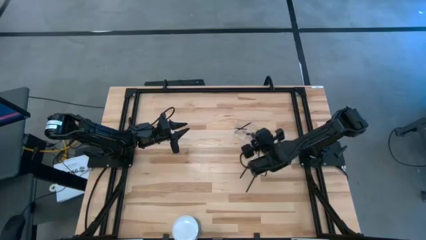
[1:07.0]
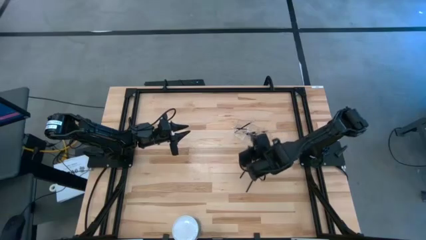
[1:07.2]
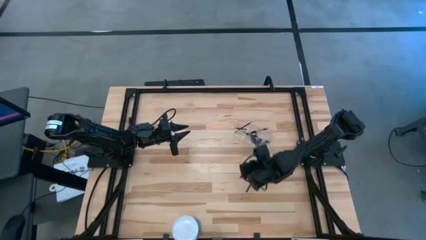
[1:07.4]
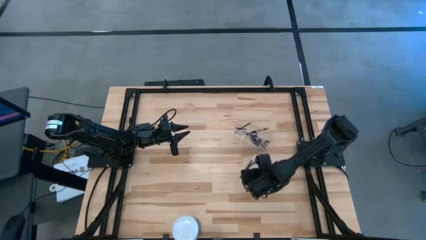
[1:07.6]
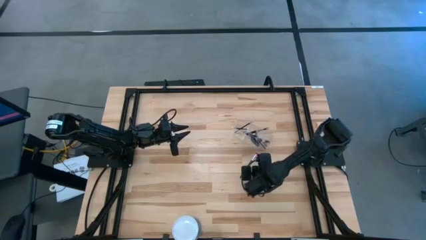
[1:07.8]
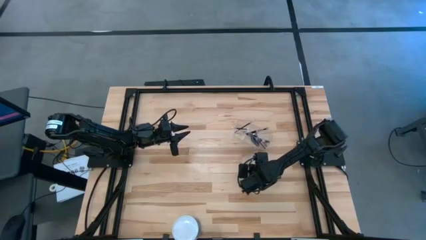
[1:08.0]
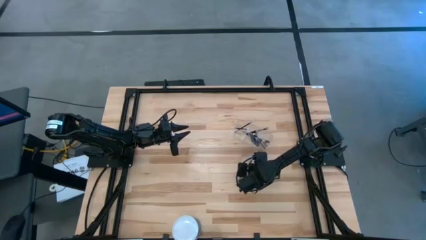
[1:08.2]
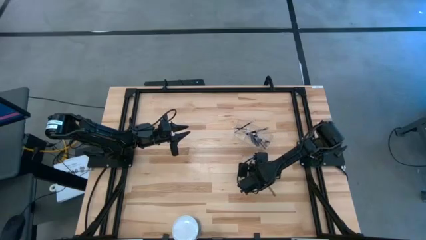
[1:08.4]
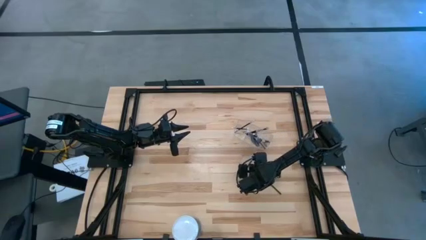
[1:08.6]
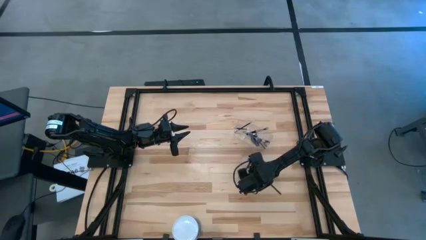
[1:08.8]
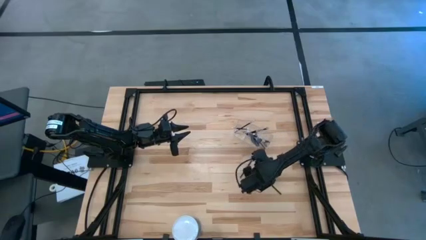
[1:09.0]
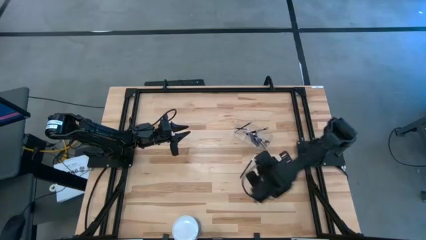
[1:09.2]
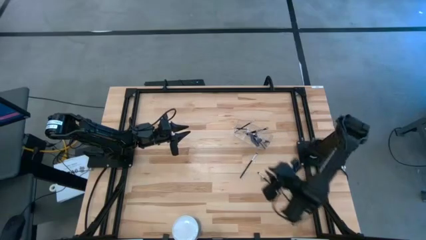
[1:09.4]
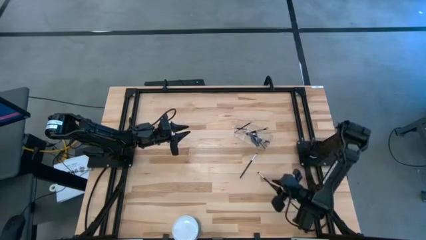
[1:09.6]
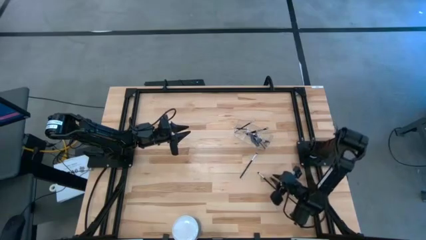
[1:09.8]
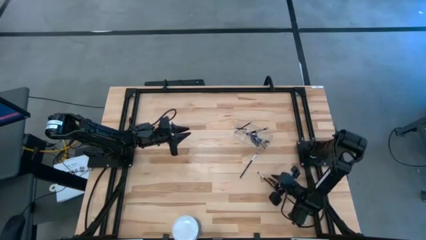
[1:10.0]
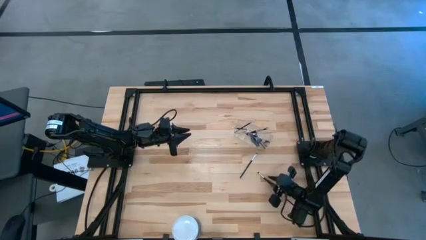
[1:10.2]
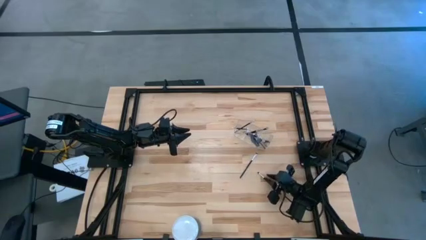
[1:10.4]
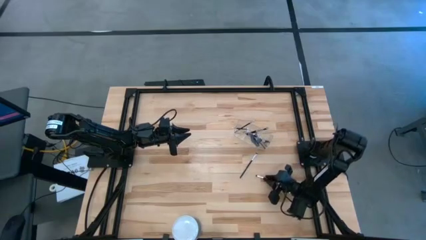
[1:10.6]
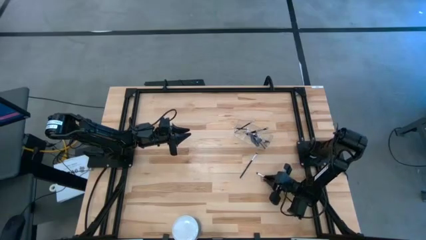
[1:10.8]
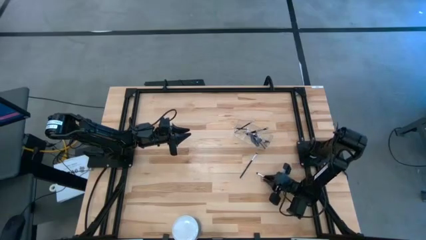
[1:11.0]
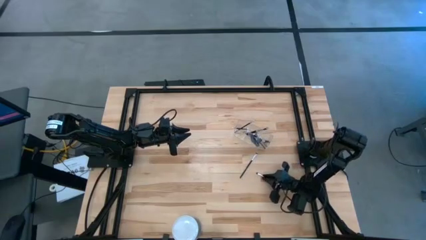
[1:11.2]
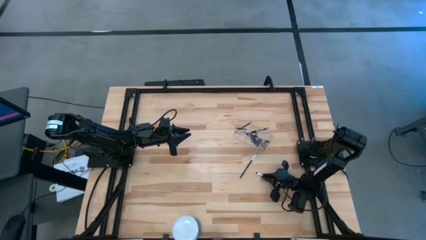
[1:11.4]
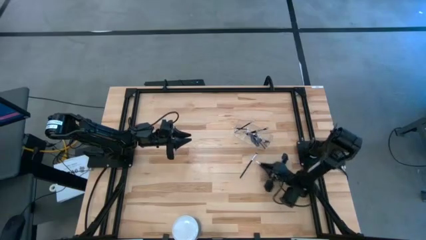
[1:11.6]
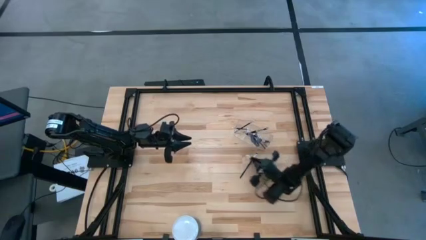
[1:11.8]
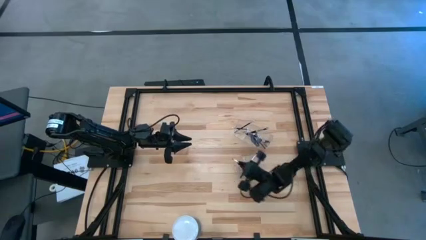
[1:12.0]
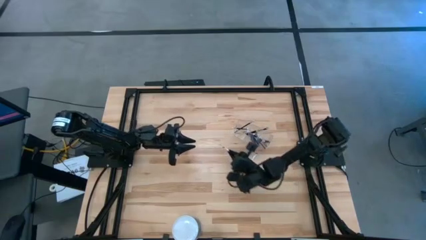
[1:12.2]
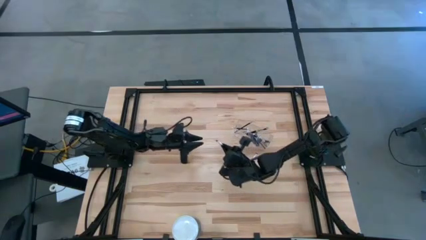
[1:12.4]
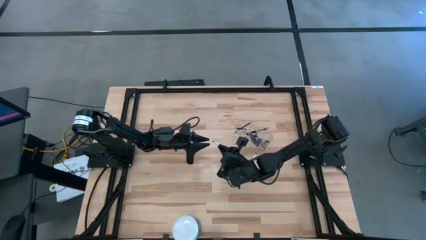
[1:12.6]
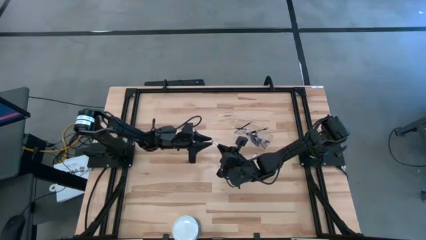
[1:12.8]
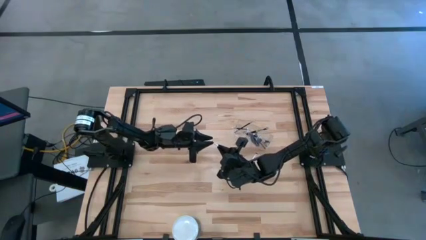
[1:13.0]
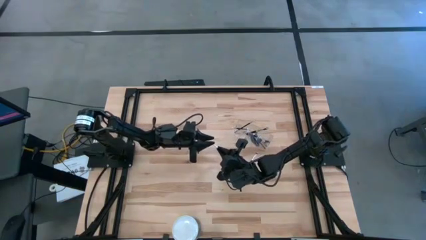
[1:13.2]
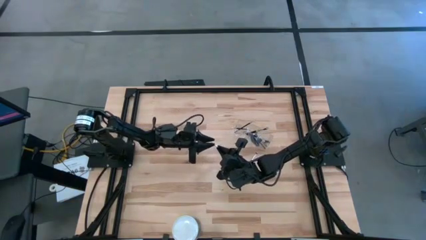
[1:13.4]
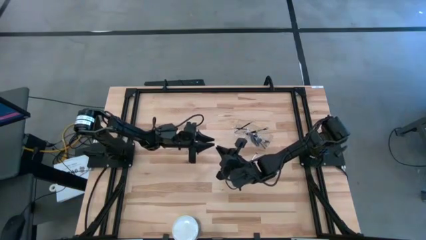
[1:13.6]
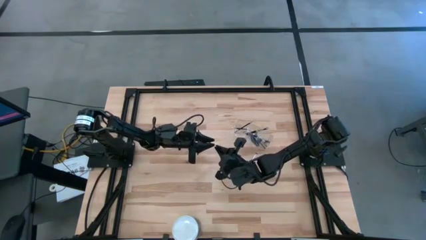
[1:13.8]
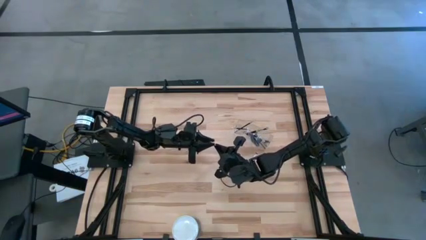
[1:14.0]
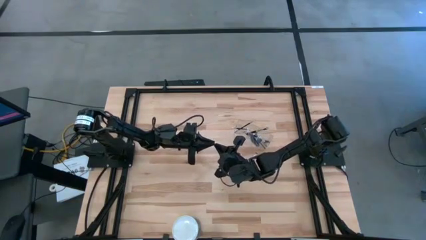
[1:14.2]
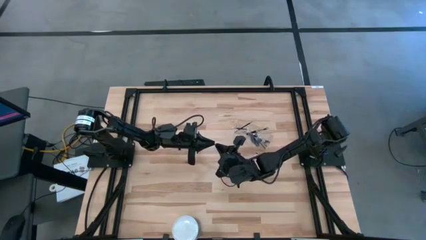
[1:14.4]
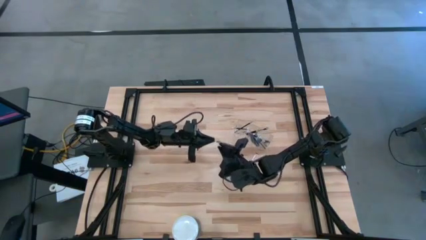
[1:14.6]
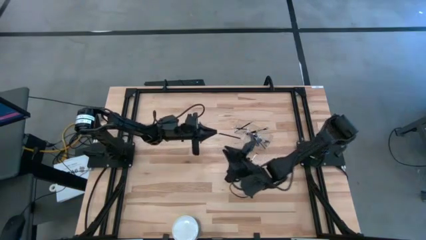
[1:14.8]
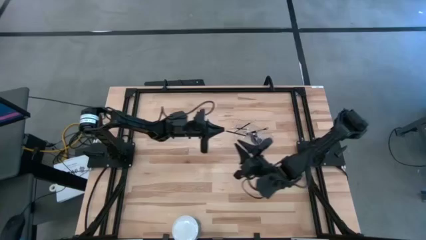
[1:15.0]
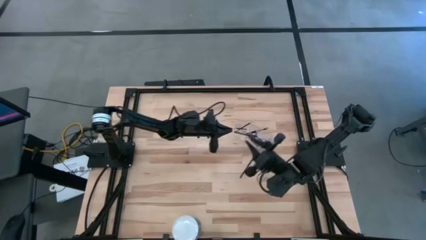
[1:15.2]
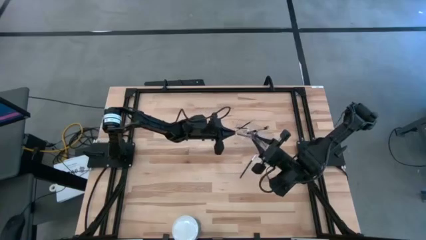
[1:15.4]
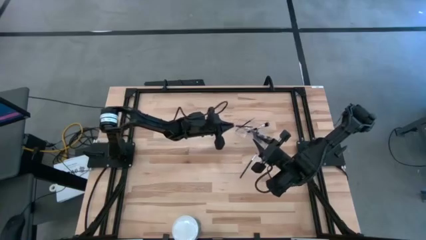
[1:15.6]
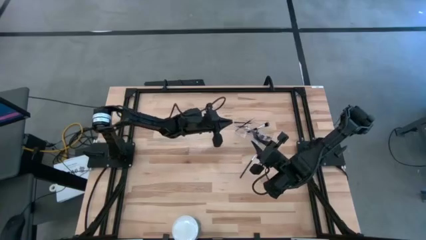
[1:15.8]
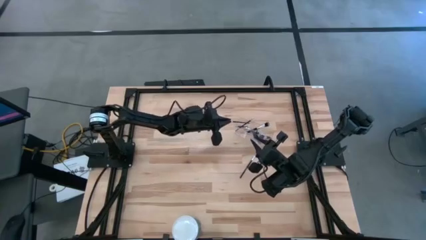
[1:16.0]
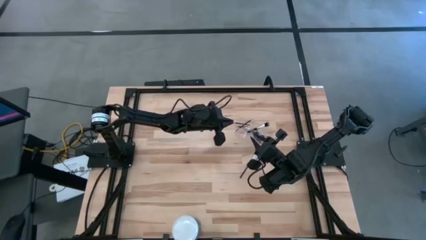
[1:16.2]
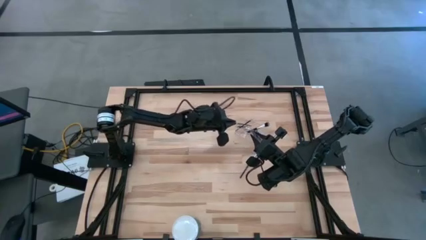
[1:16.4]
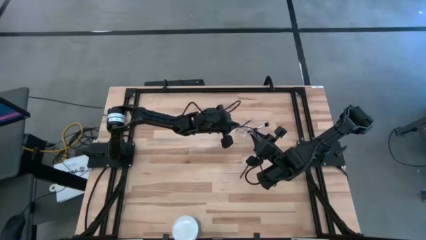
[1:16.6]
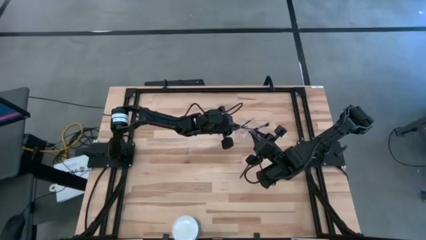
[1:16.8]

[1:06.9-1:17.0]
Task: Pick & Place Makeup Brushes
Put the black eyeshadow brush into the makeup organizer

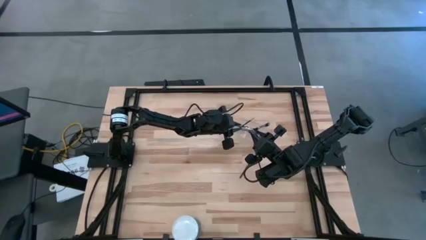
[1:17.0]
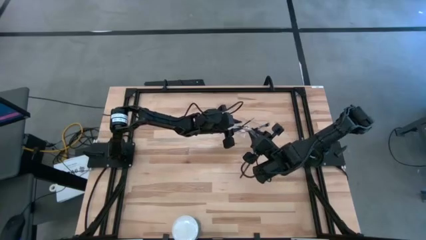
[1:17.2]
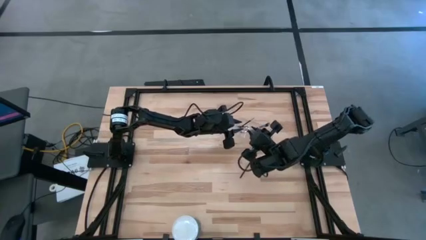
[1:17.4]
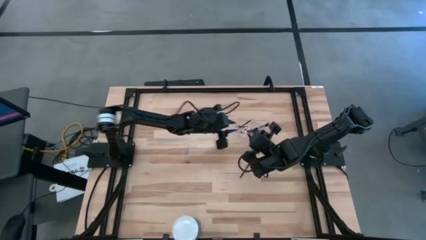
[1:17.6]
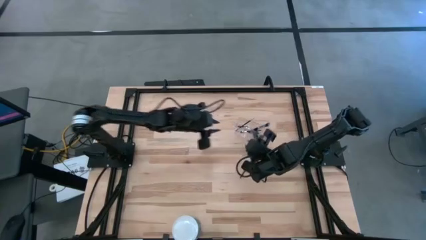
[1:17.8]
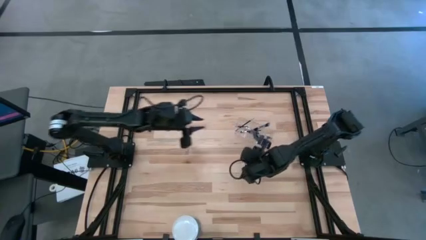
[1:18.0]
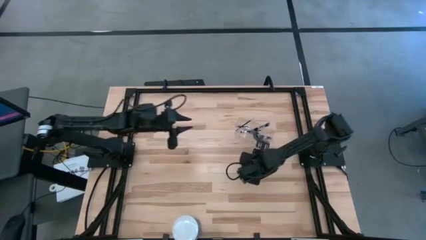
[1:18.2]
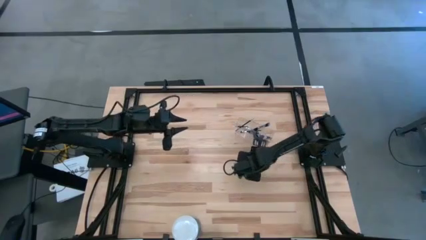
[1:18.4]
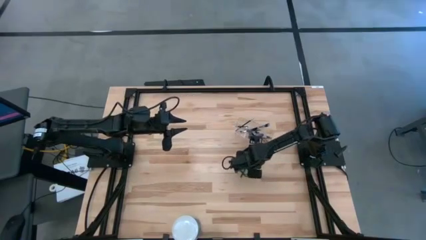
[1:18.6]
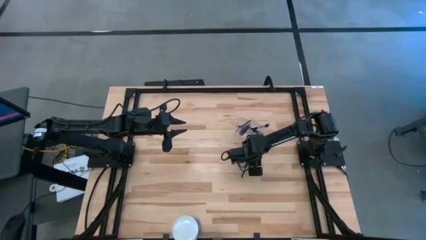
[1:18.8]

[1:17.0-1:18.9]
Put the black eyeshadow brush into the makeup organizer

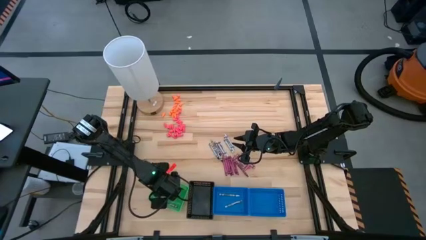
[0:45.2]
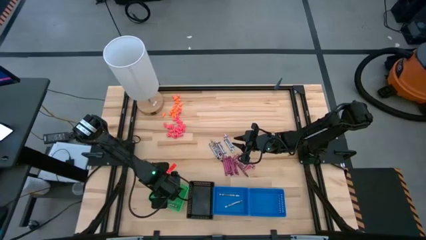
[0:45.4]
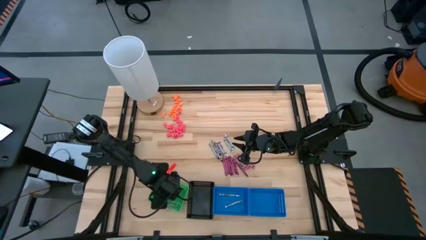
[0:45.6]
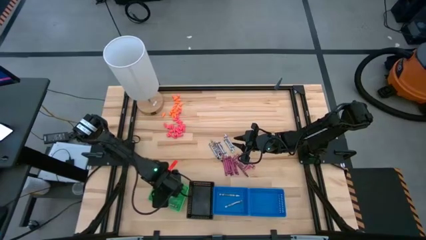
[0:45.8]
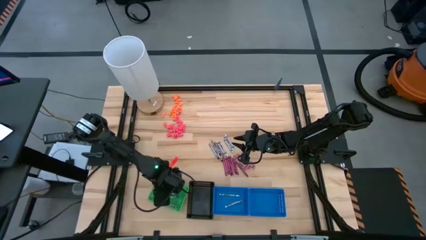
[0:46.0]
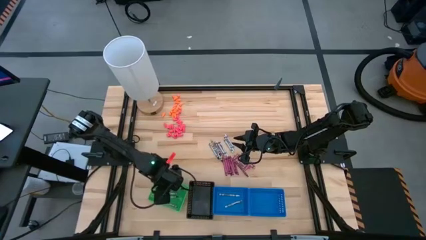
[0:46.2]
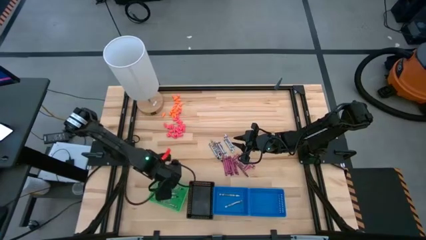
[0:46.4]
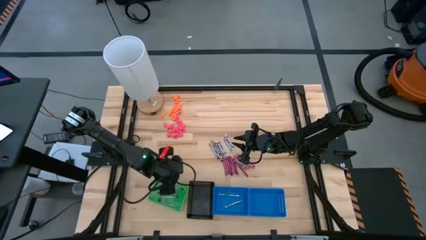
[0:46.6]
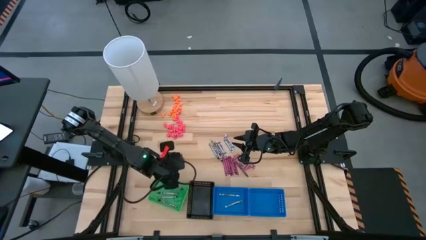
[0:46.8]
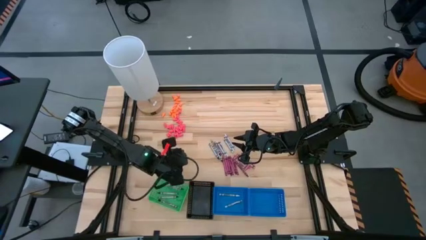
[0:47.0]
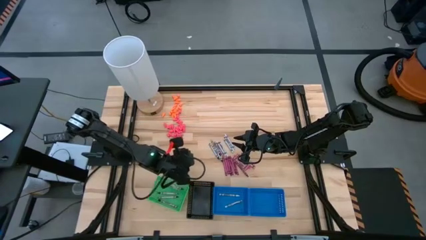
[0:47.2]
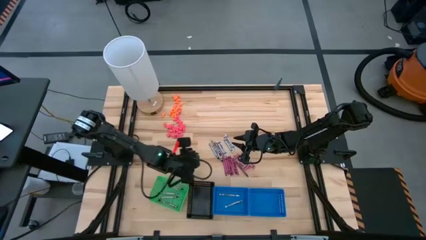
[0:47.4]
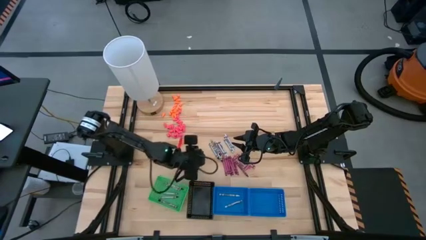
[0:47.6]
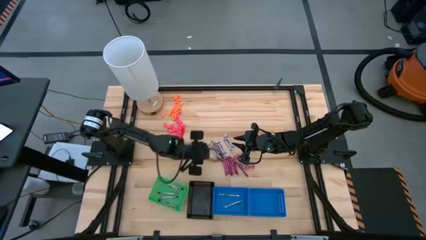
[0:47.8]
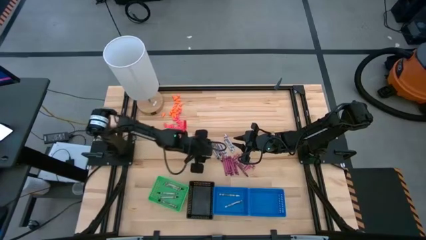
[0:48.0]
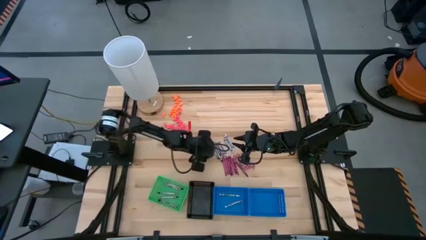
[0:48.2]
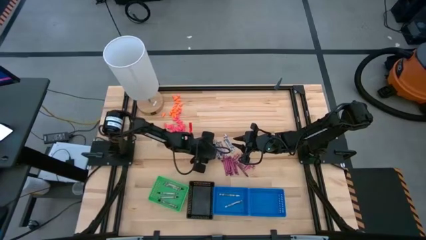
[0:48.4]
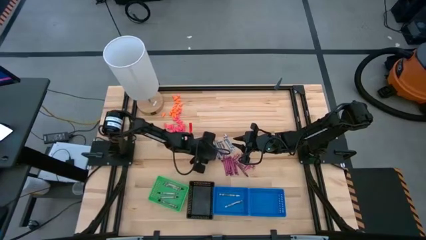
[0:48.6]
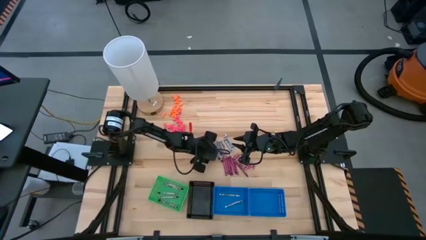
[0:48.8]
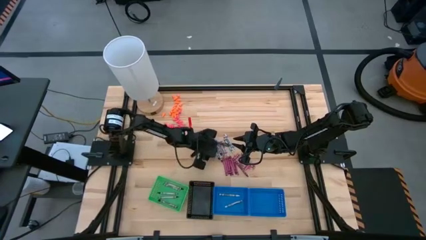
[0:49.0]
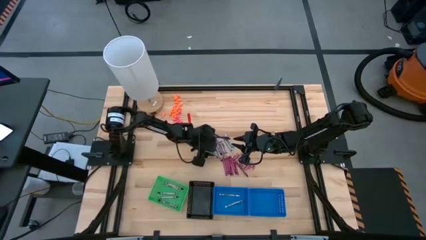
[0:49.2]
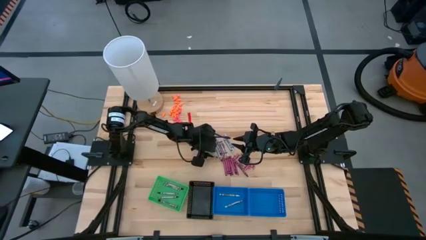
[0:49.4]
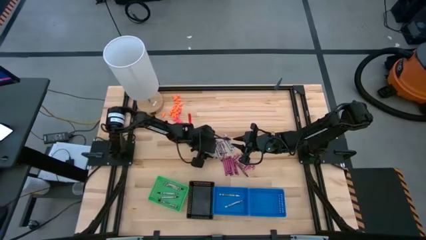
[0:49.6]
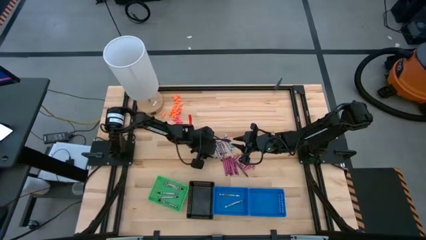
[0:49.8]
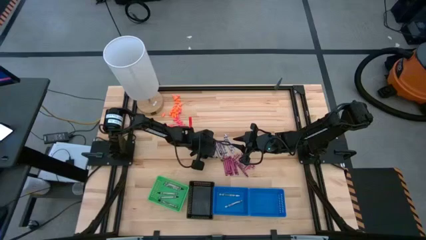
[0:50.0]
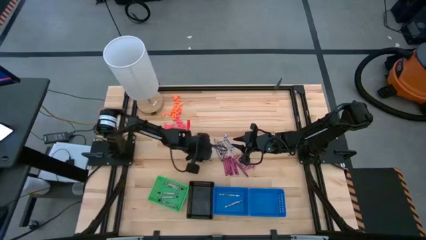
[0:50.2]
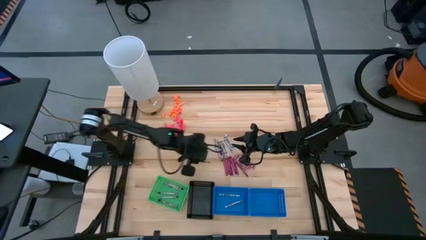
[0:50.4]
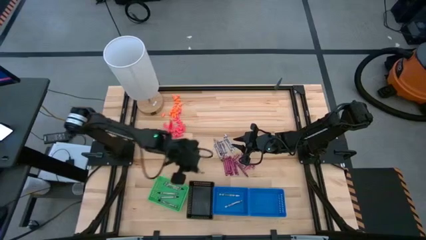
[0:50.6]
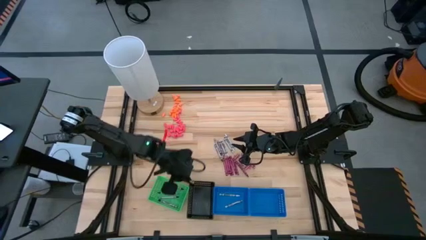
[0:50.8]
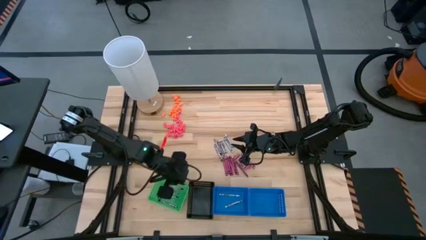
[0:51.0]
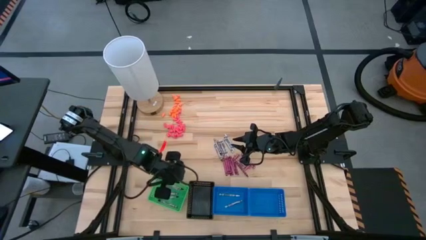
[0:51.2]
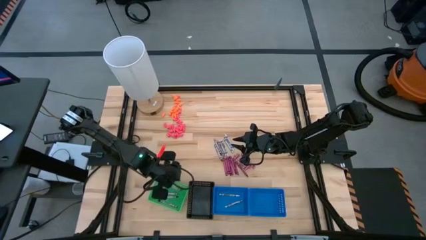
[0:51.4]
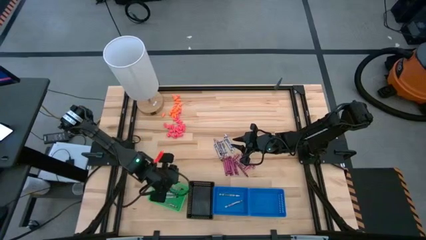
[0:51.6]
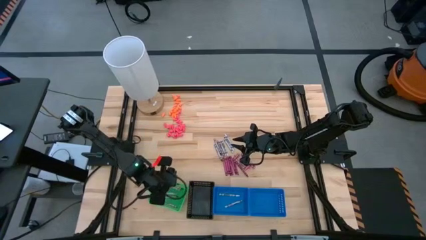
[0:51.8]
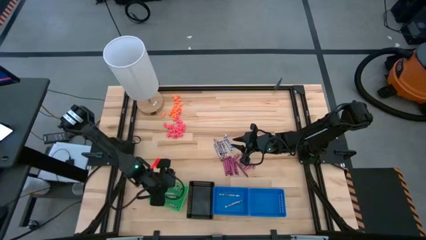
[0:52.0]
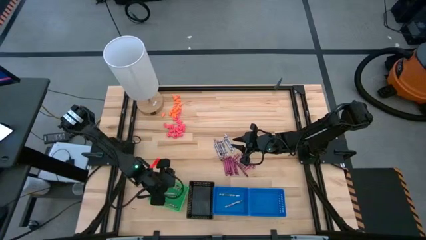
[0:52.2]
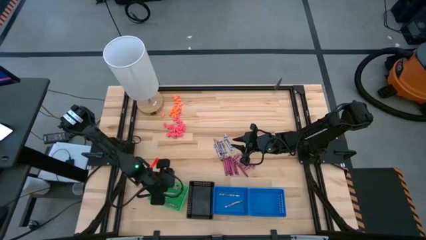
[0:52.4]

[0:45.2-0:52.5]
Task: Sort crayons
Put the black crayon into the green bin
